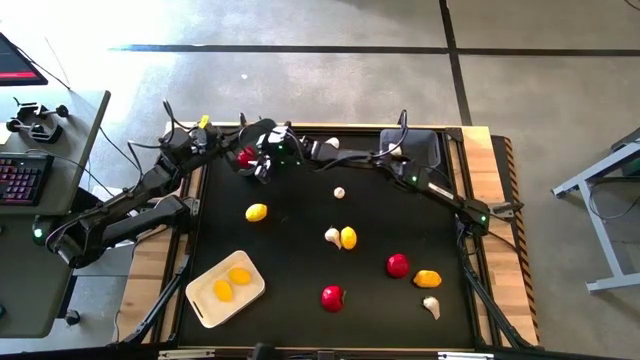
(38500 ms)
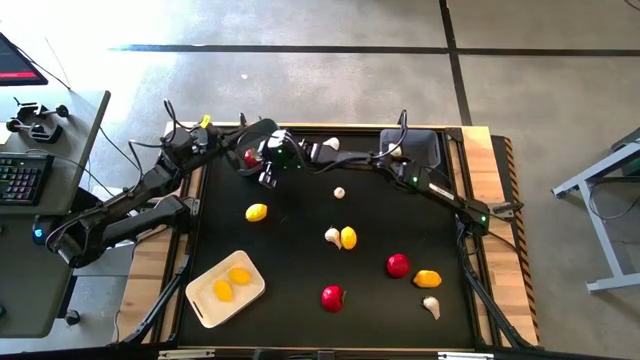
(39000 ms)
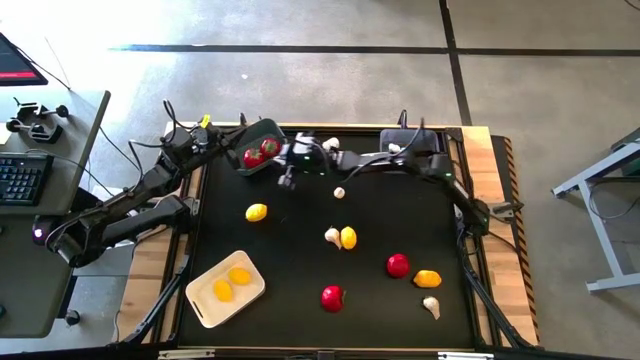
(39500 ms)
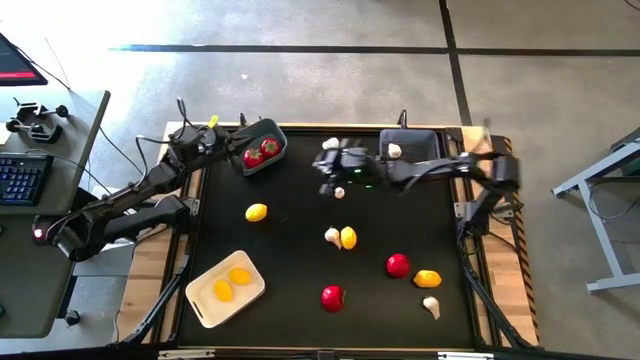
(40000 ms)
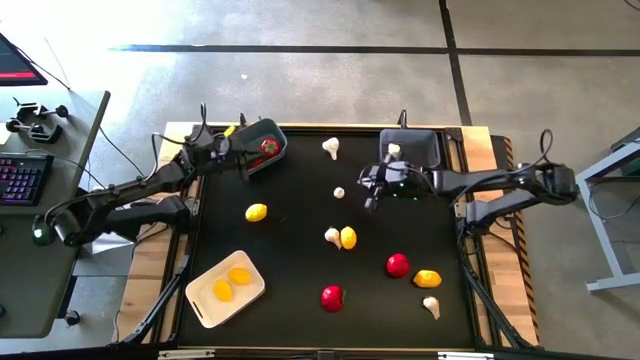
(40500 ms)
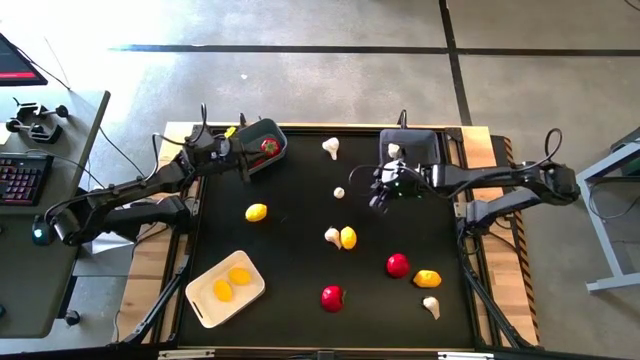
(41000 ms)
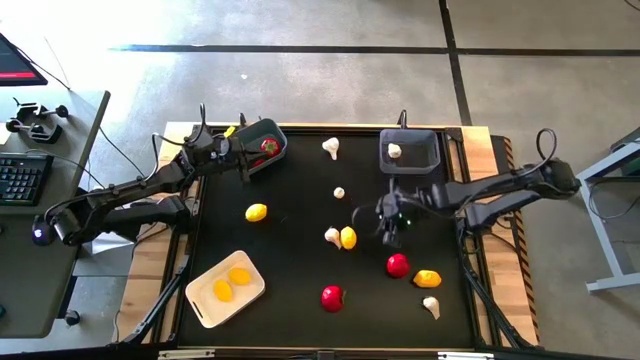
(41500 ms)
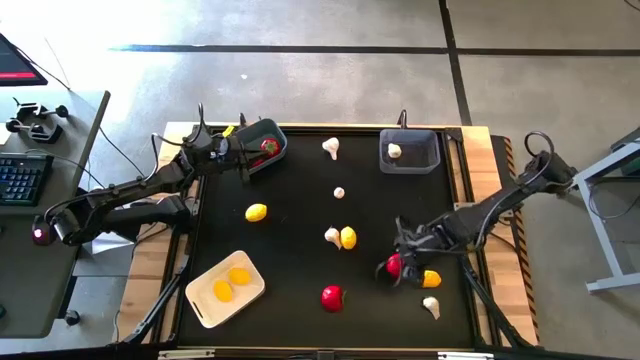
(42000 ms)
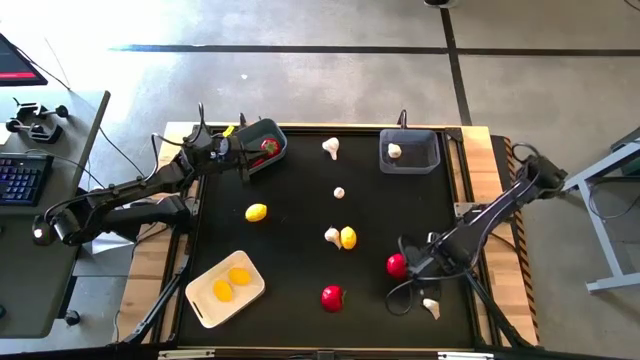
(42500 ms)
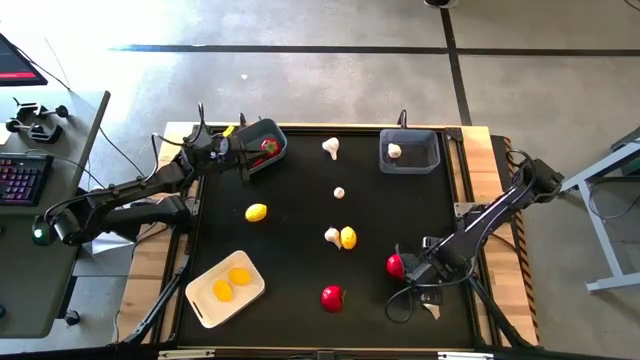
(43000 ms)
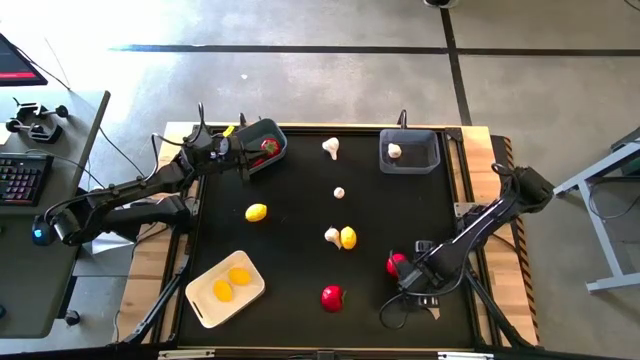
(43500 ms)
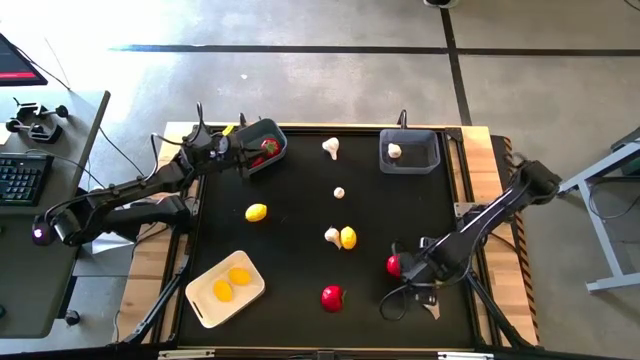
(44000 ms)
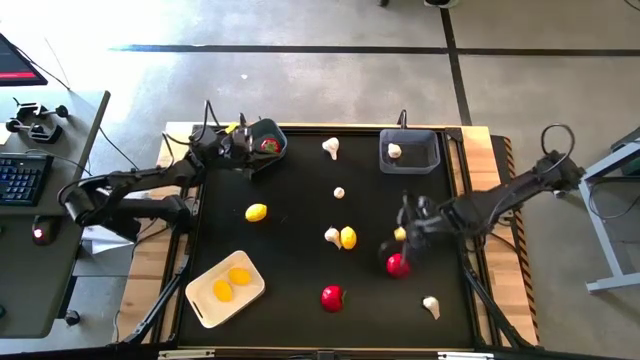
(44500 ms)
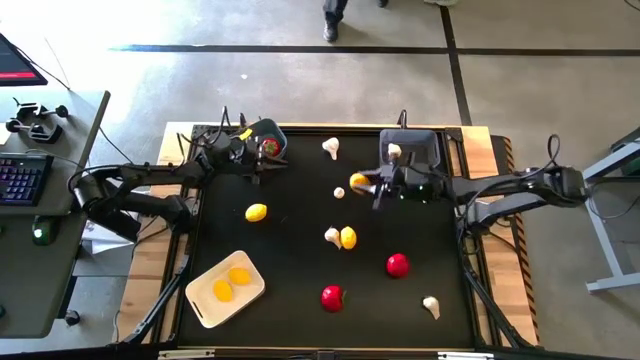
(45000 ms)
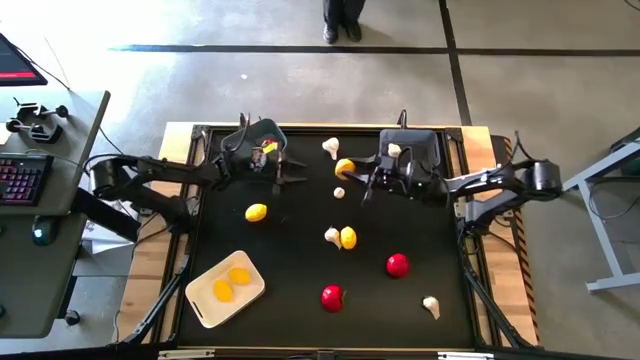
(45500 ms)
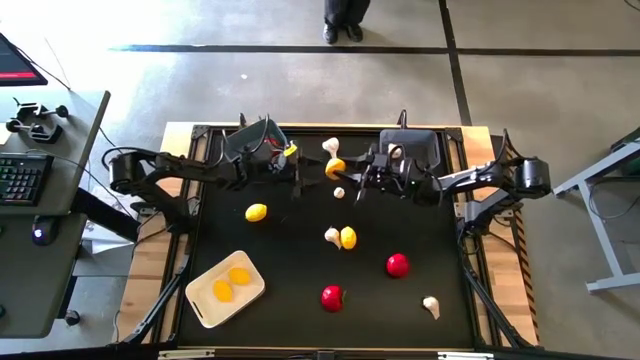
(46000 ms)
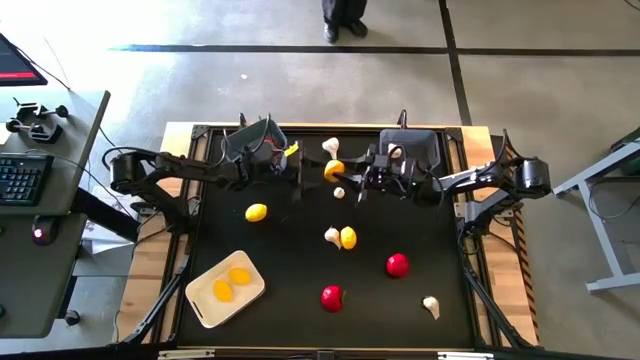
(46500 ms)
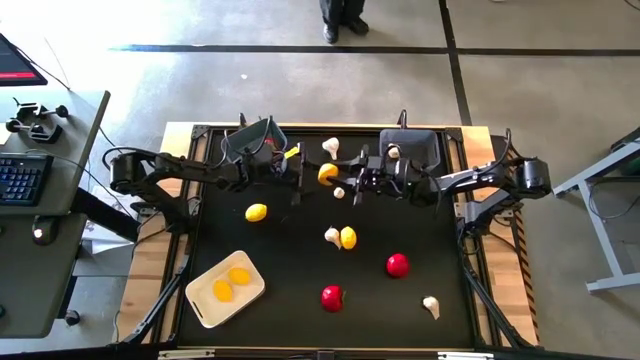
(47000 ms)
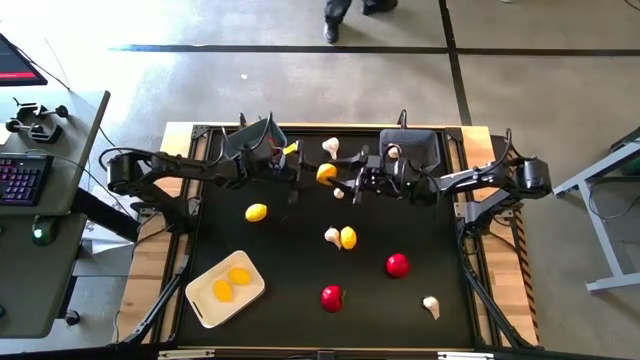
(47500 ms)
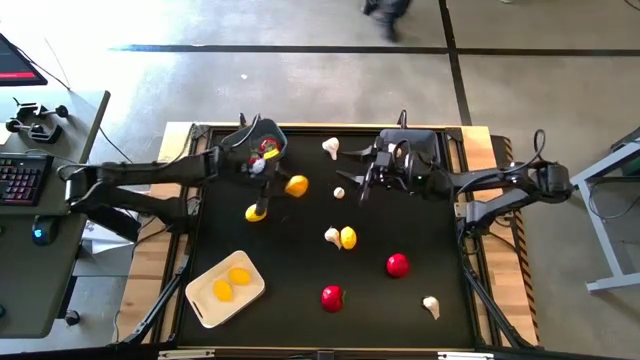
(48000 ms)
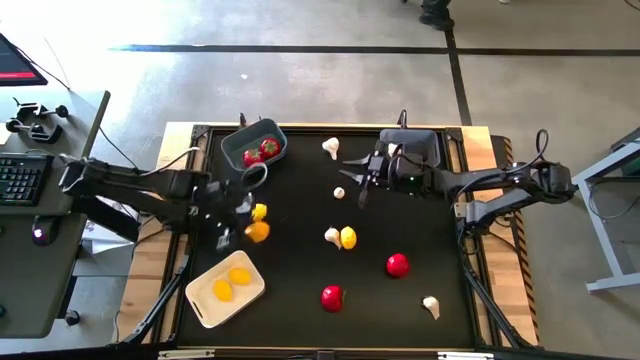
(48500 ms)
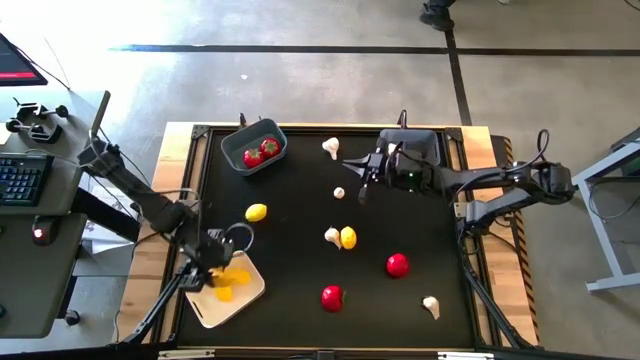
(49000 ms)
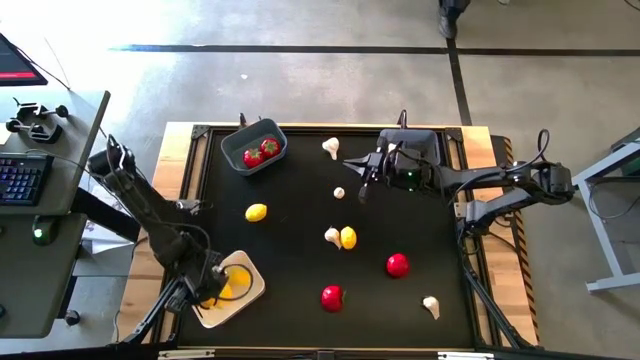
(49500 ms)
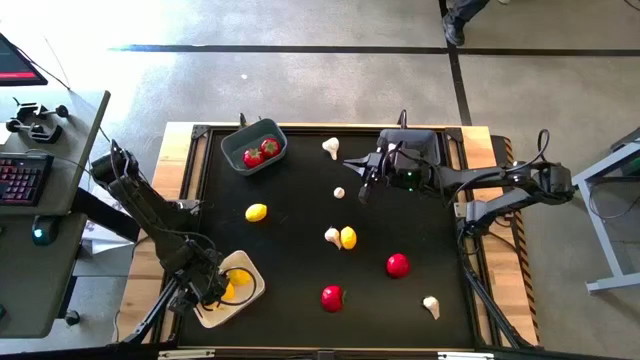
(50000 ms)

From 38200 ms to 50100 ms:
Task: Sort produce into baskets
Put the yellow lemon into the white bin

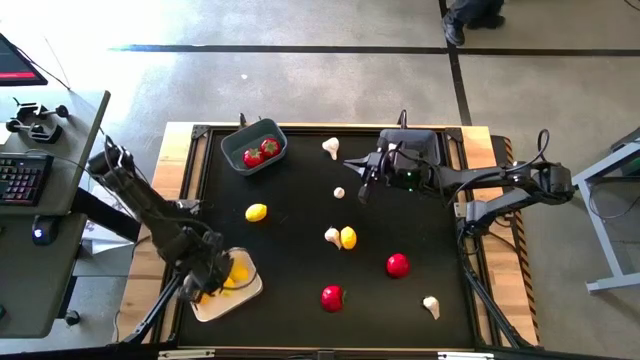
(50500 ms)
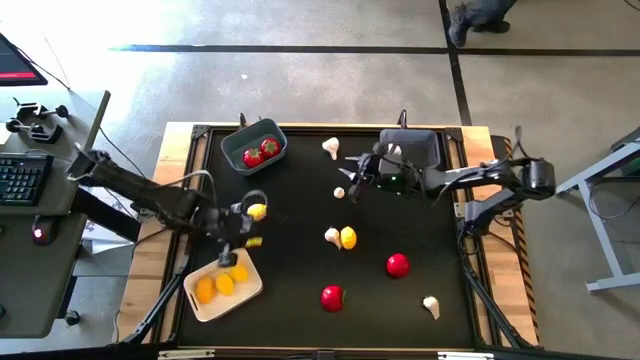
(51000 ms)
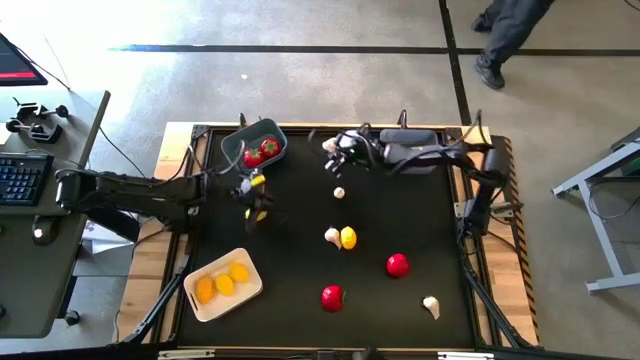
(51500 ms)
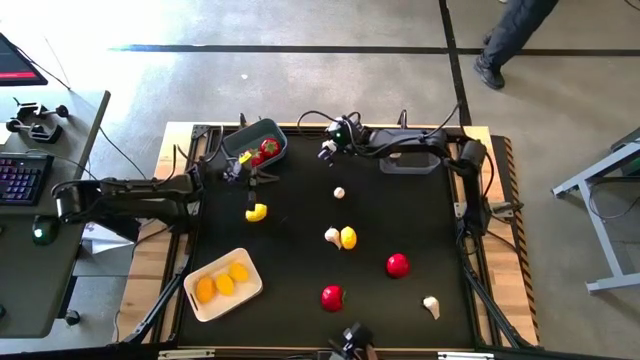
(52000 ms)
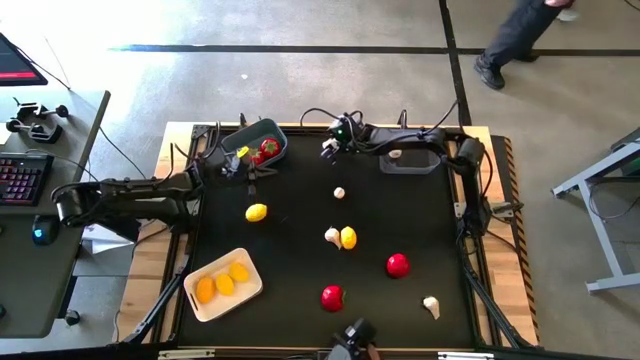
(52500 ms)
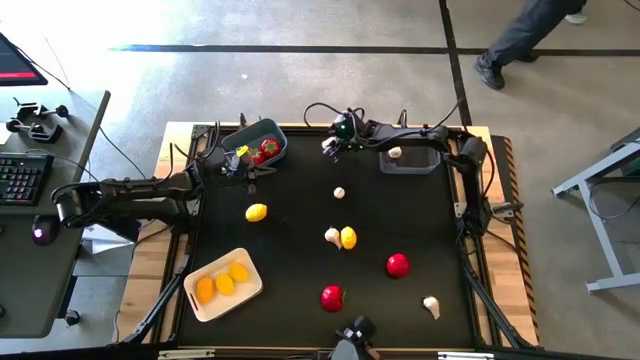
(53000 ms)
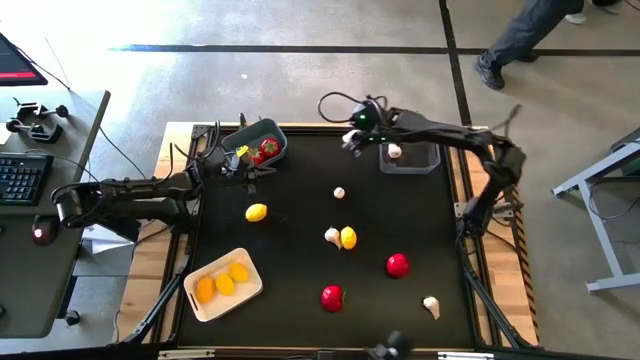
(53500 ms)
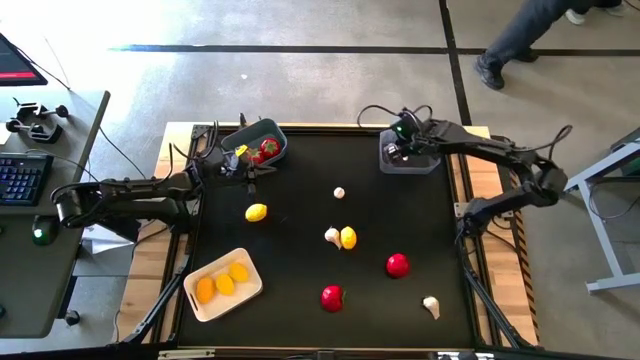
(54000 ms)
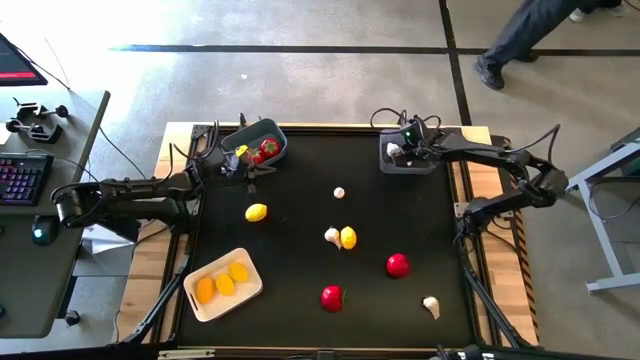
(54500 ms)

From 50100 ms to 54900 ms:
Put the white garlic into the transparent bin

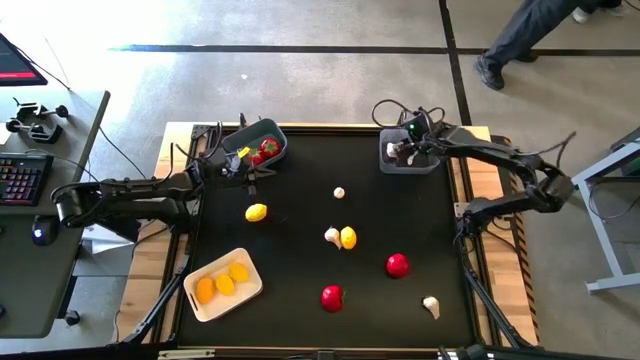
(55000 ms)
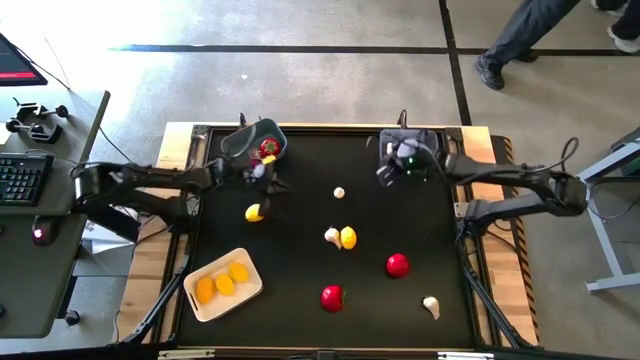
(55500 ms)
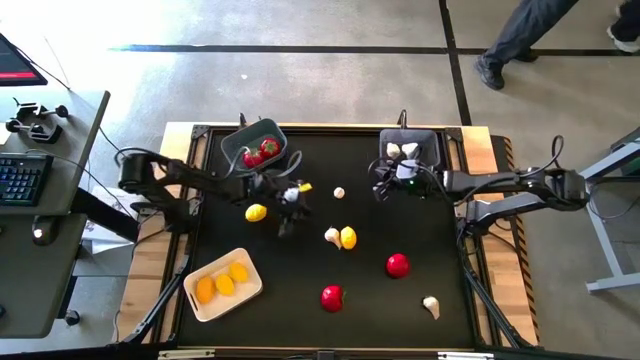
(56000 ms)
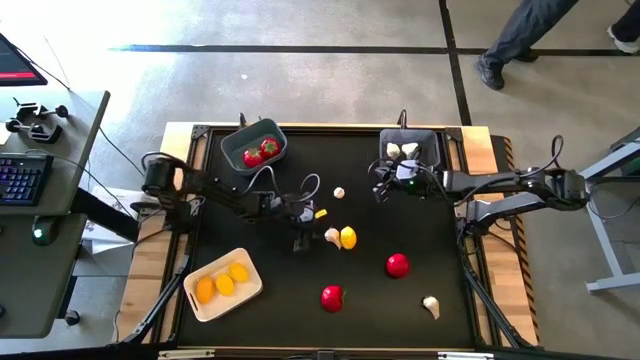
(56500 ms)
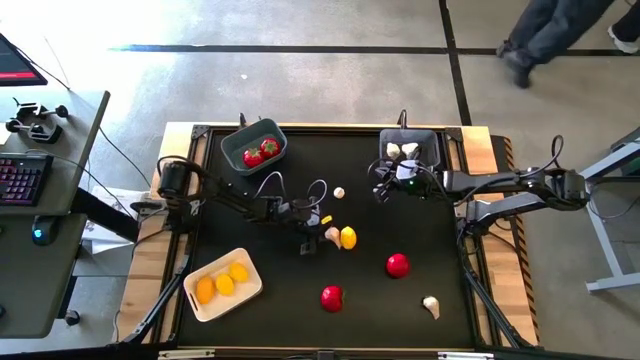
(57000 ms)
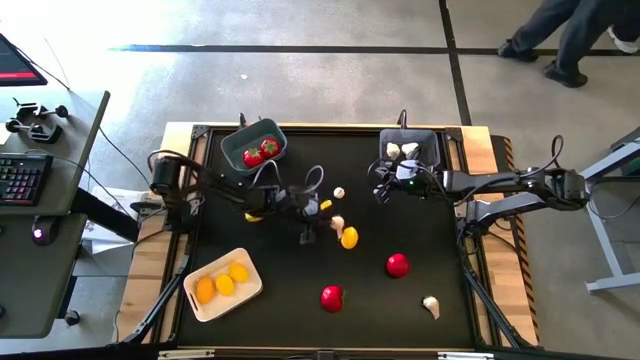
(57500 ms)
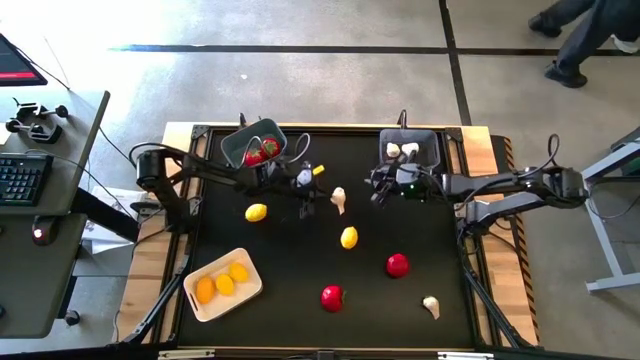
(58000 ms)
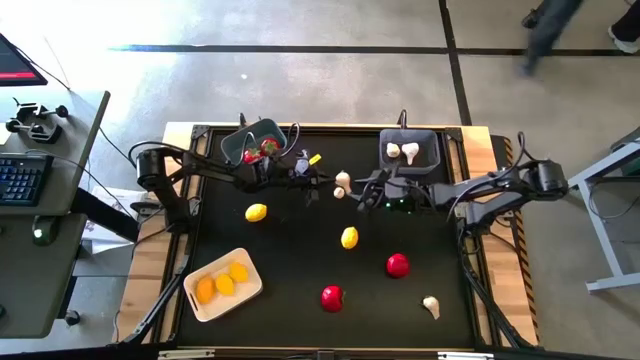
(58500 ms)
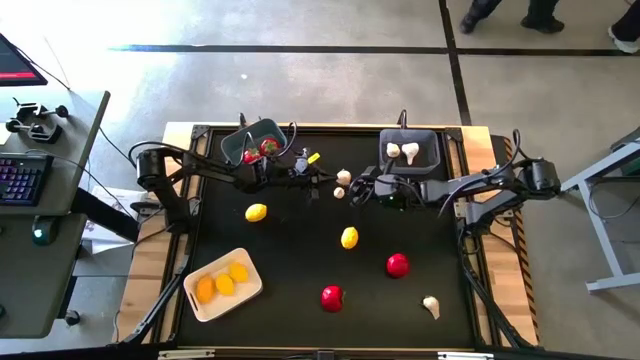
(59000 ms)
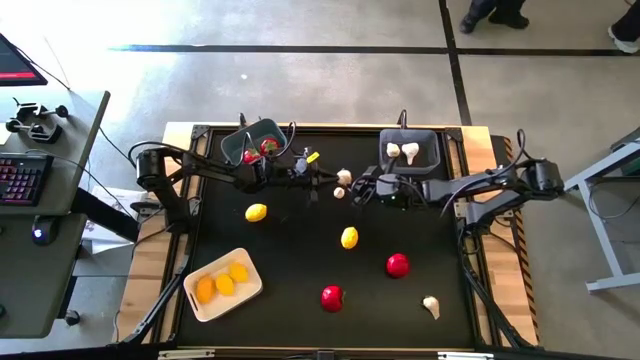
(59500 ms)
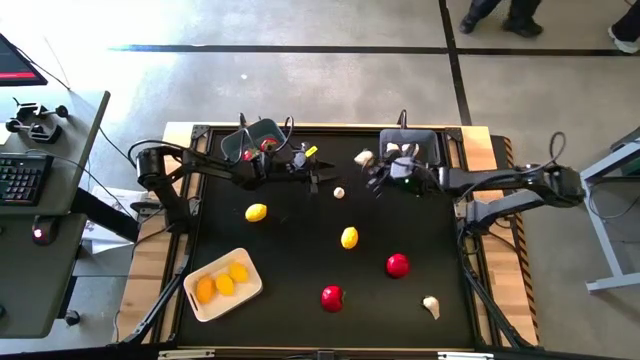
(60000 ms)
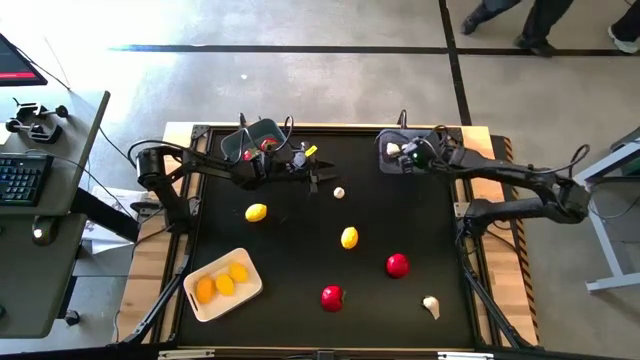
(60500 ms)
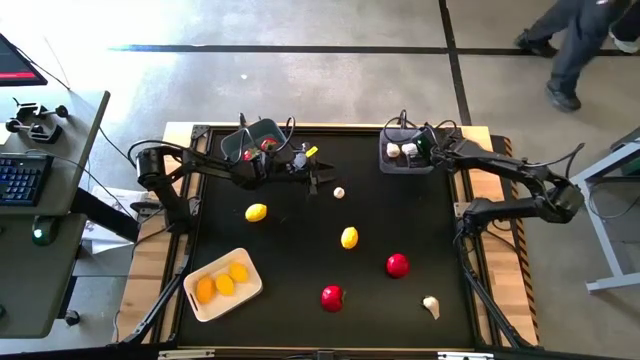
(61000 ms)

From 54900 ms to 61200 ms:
Put the white garlic into the transparent bin
